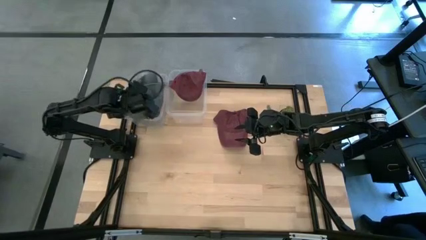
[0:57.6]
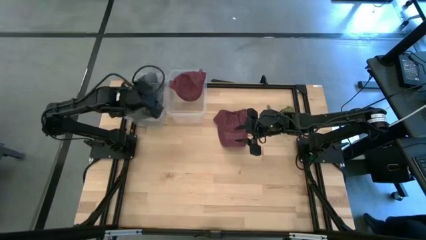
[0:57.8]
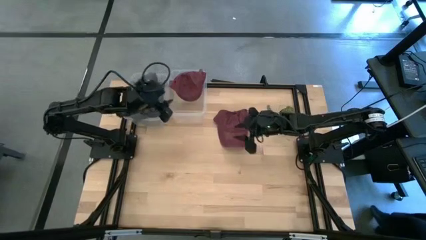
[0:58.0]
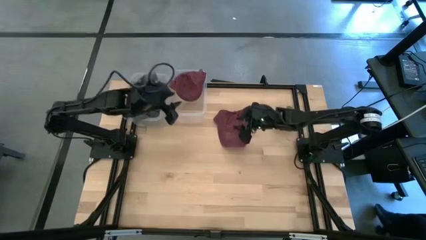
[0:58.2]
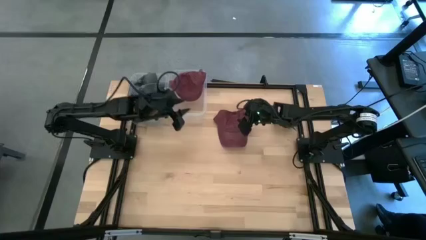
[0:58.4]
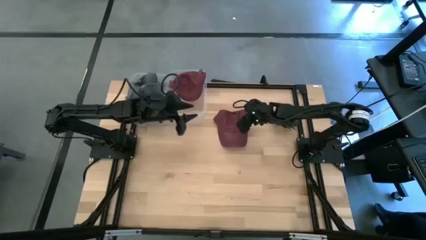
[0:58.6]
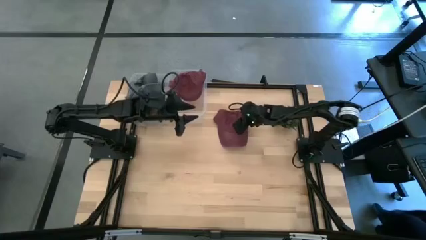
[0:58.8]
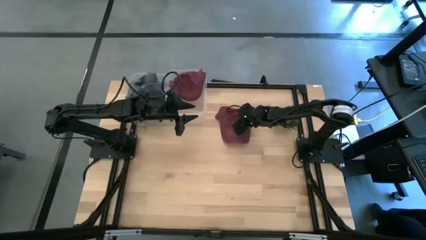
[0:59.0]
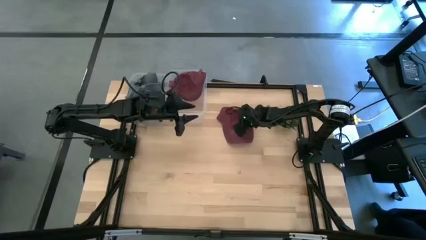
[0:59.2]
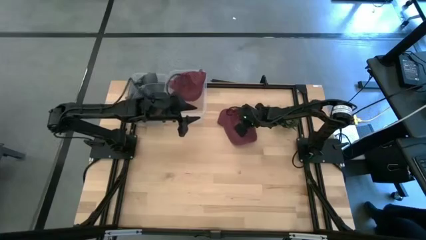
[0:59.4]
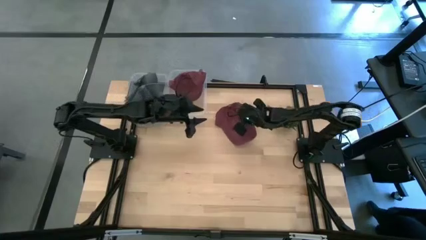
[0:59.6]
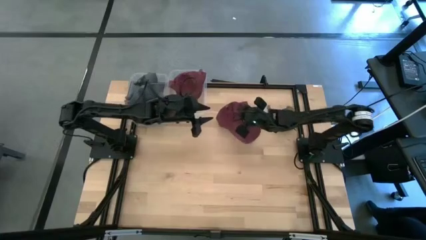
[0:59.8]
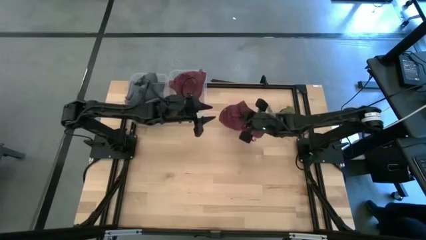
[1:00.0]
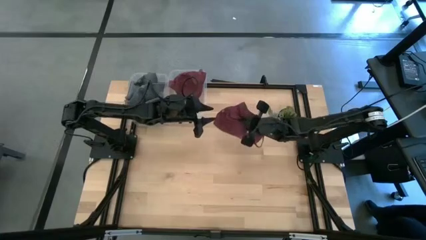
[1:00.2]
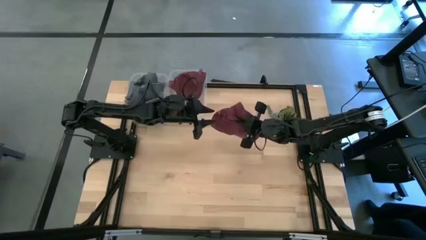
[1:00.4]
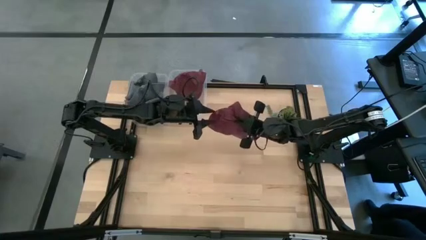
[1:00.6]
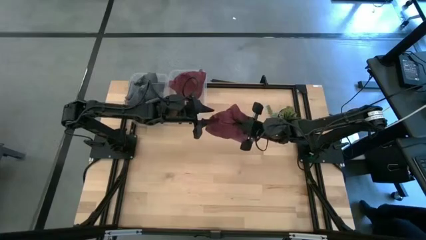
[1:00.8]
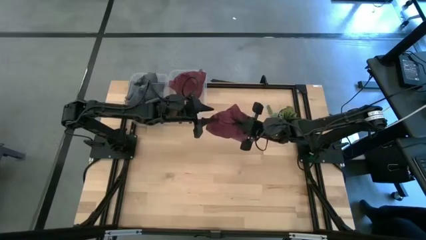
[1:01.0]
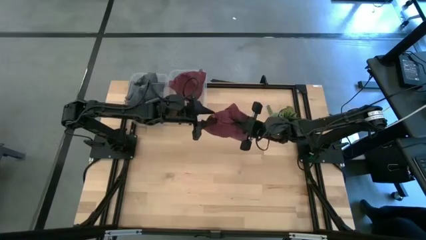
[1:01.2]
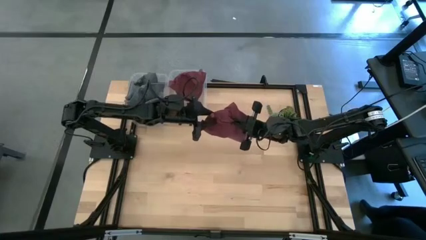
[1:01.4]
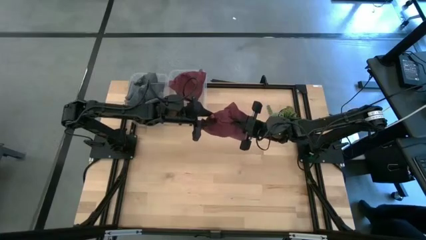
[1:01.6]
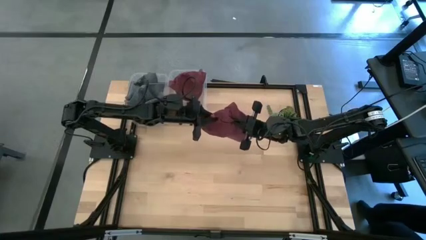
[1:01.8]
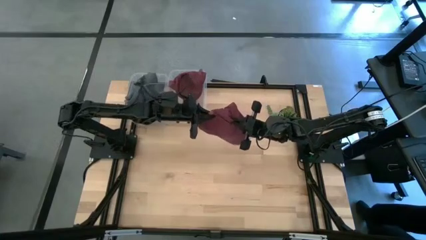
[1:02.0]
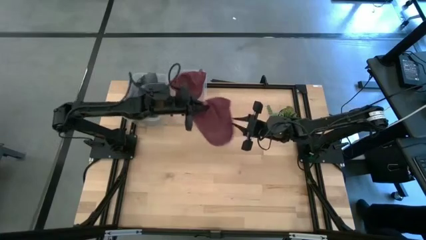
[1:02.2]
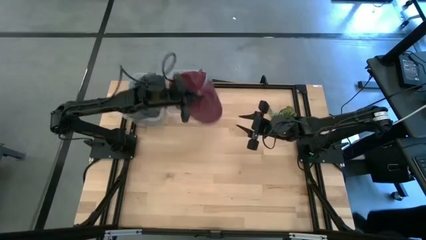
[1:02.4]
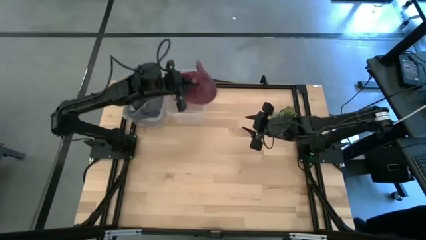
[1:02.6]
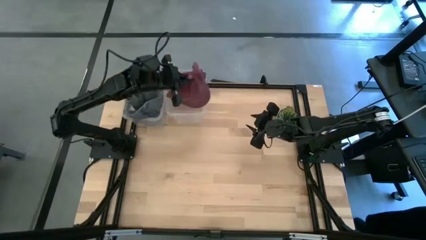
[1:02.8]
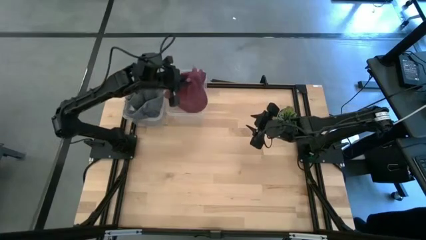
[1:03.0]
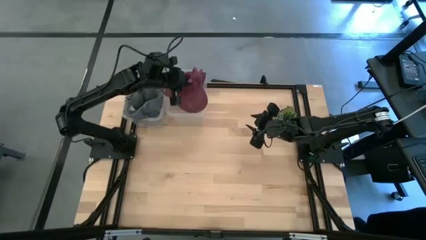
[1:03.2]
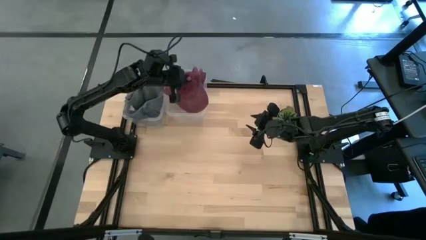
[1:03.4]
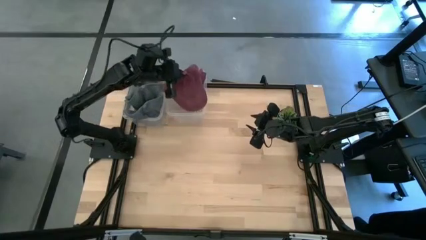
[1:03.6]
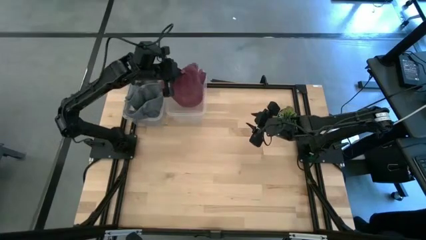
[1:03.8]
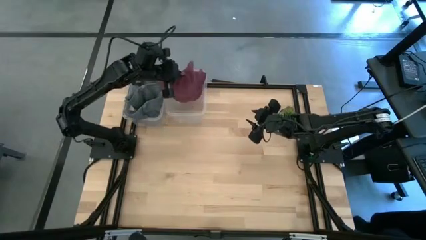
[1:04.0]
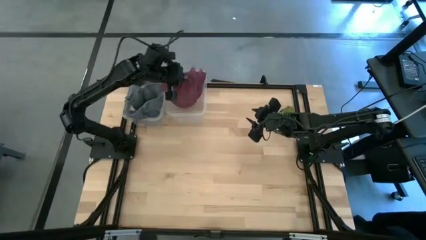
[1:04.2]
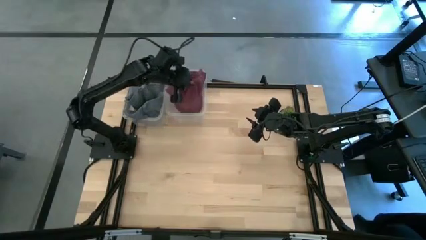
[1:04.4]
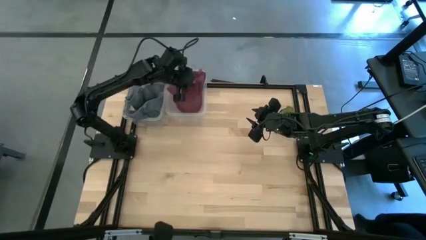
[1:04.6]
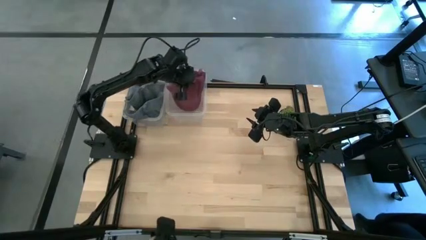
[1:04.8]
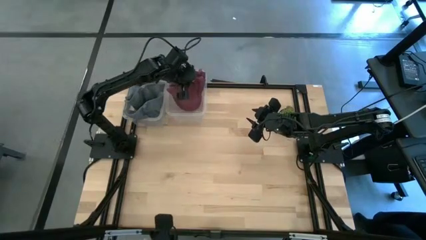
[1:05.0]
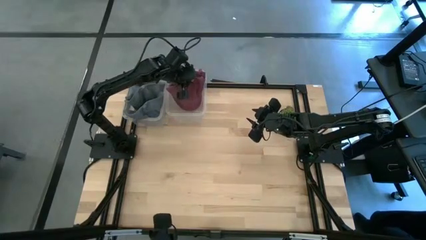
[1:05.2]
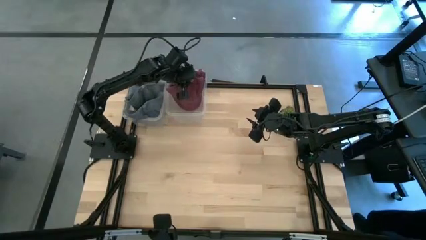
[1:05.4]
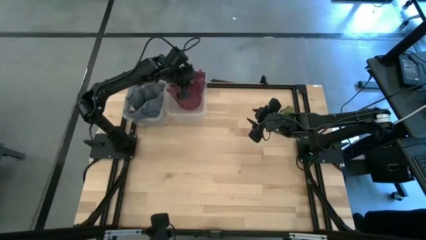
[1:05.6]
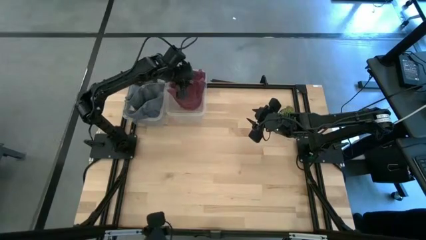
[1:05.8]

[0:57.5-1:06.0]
Task: Pick & Place hat
Put the red cap into the right transparent bin

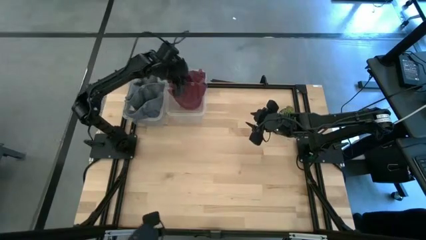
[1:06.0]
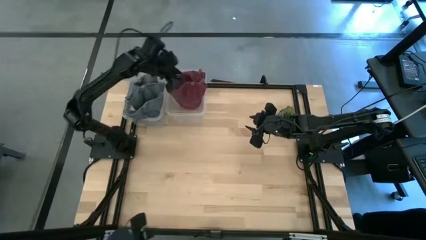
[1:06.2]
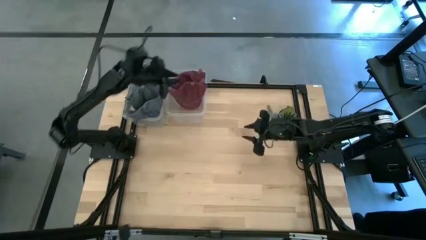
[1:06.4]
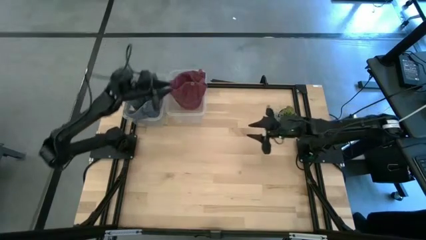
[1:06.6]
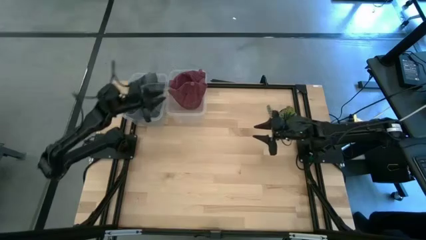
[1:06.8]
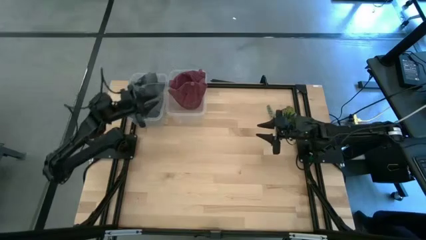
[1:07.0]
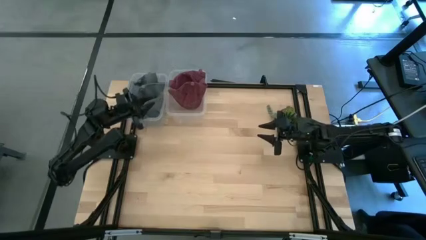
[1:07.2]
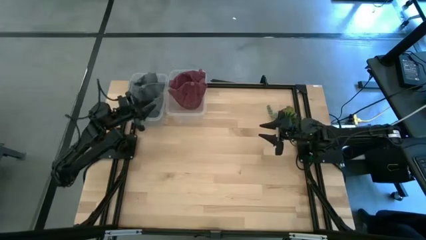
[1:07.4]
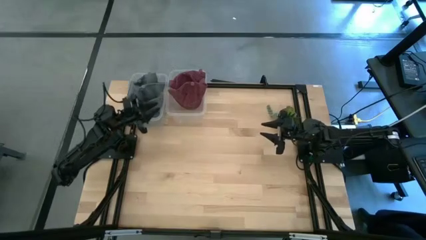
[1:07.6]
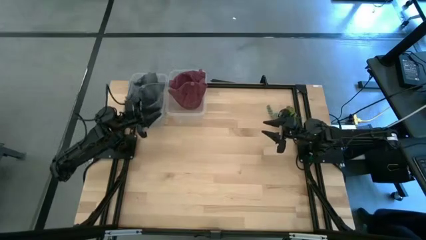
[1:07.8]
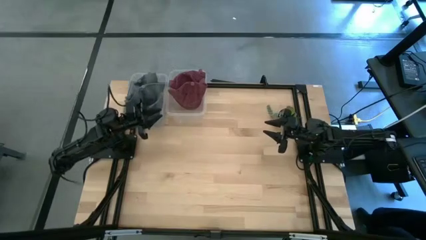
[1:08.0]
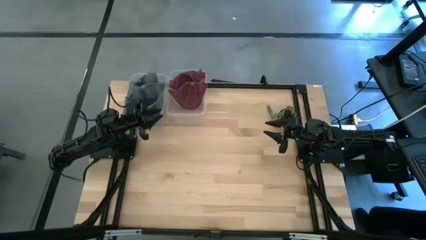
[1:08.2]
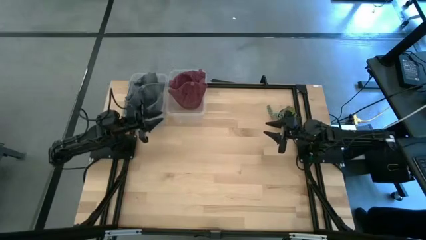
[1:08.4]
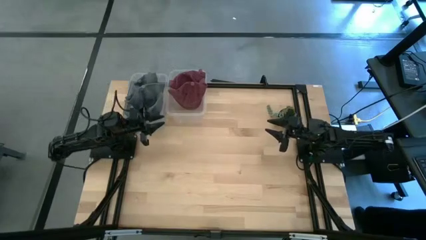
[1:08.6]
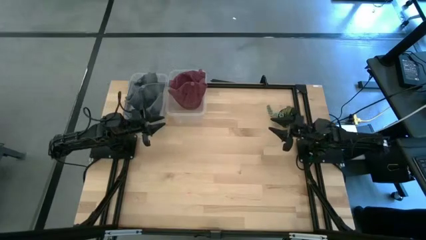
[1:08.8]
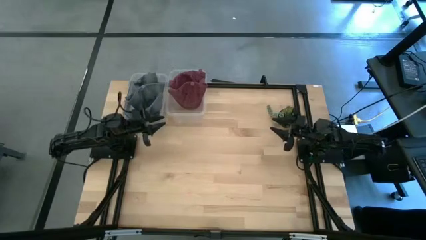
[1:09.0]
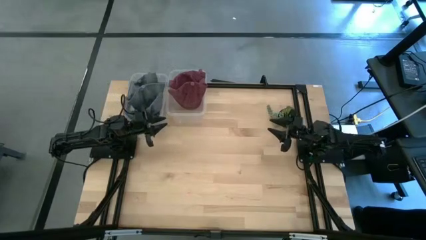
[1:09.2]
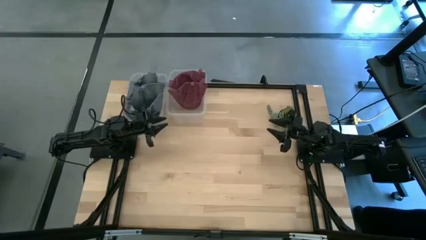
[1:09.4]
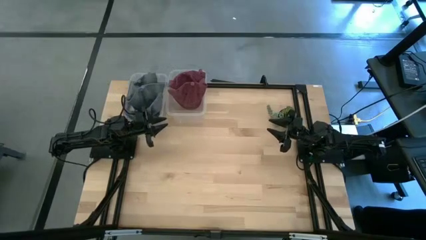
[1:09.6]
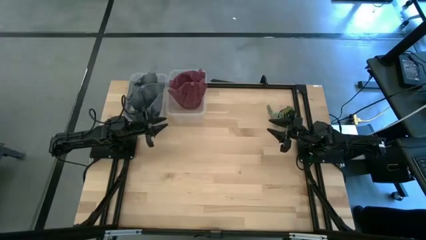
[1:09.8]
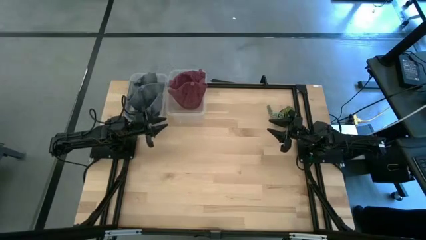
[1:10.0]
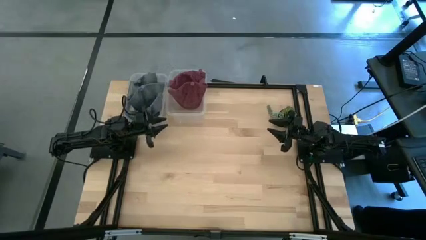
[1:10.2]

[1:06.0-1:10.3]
Return to Home Position

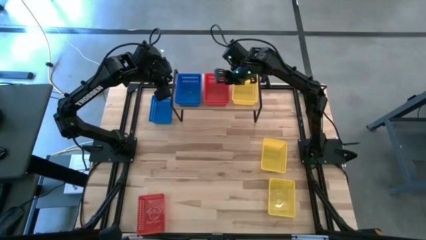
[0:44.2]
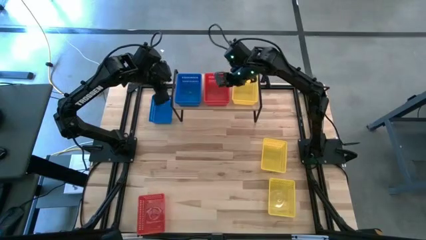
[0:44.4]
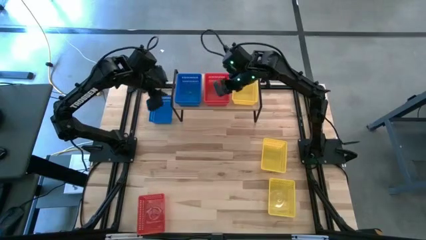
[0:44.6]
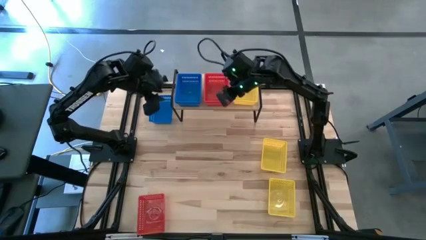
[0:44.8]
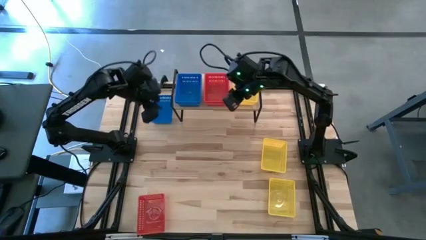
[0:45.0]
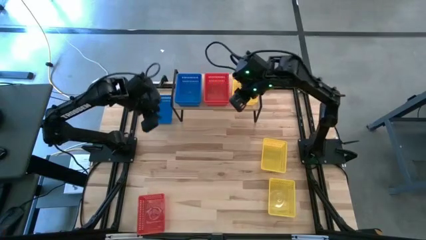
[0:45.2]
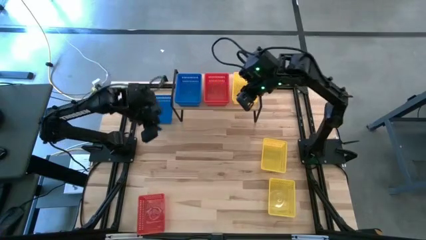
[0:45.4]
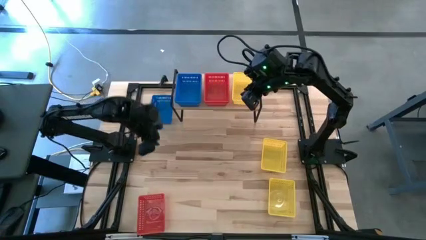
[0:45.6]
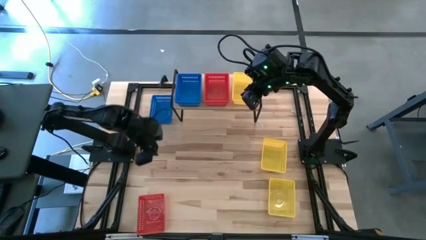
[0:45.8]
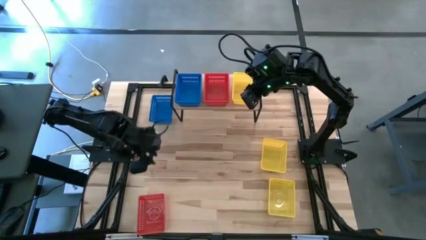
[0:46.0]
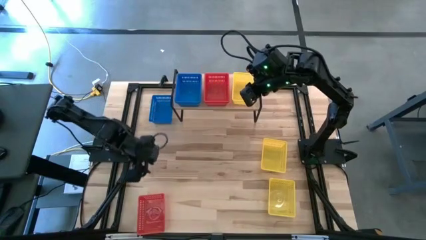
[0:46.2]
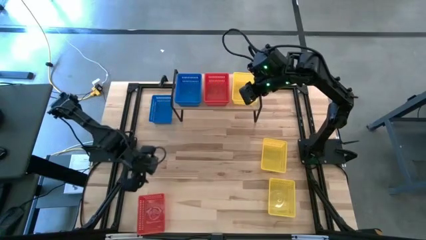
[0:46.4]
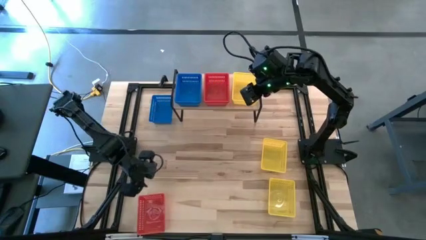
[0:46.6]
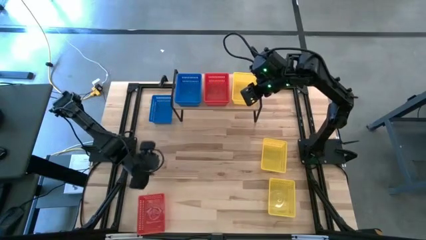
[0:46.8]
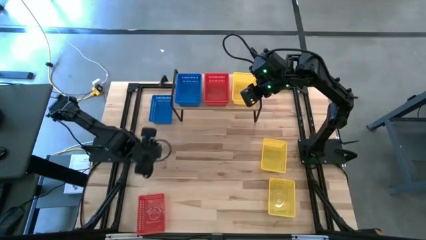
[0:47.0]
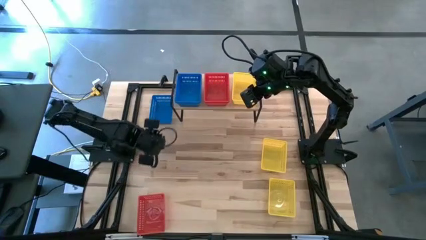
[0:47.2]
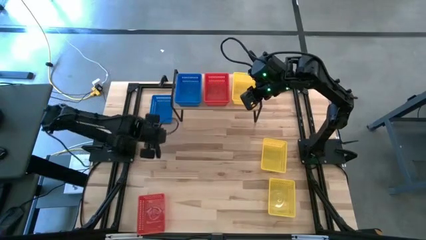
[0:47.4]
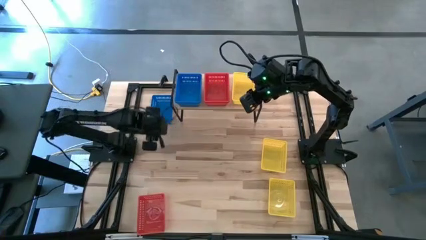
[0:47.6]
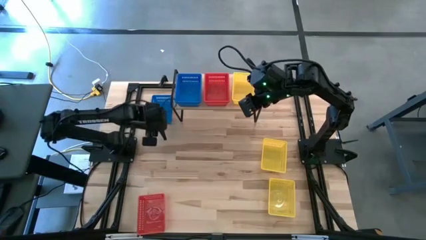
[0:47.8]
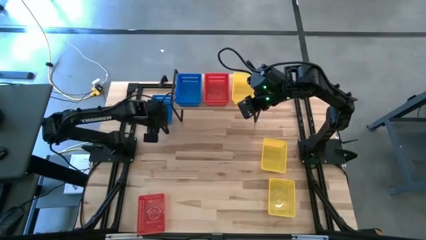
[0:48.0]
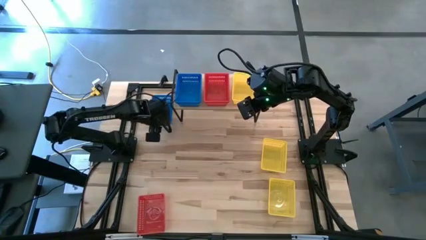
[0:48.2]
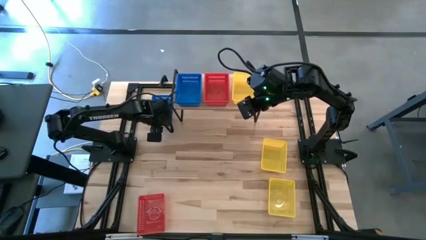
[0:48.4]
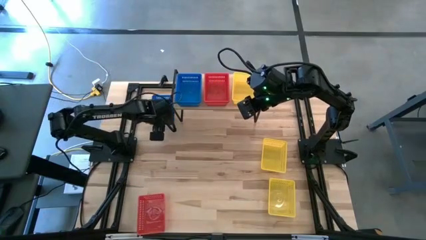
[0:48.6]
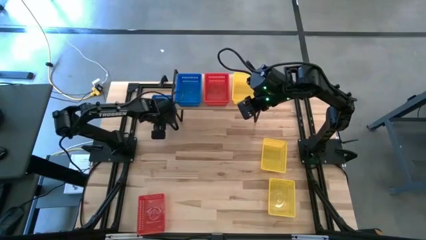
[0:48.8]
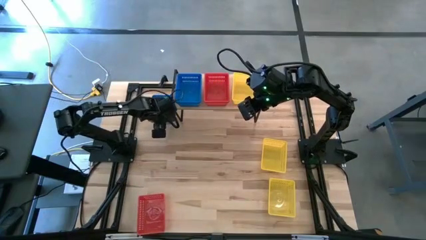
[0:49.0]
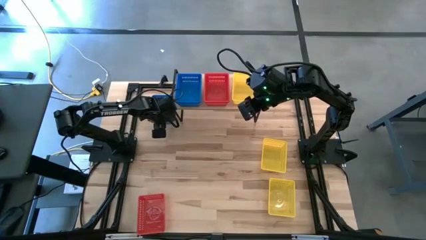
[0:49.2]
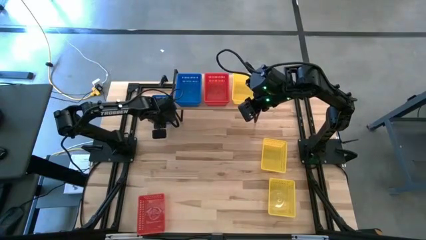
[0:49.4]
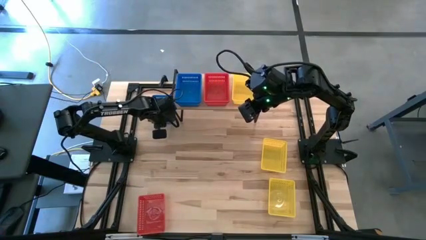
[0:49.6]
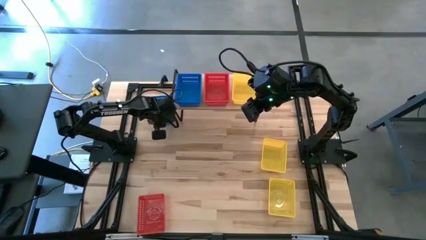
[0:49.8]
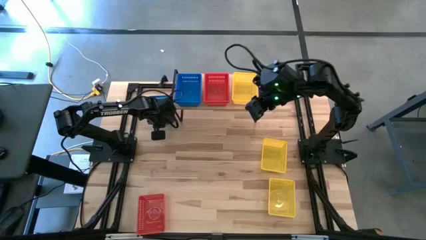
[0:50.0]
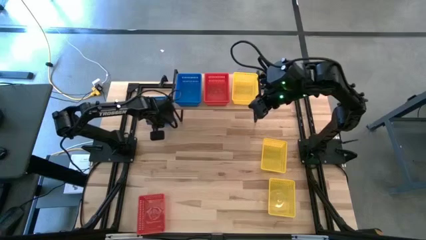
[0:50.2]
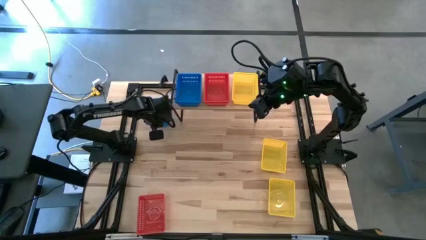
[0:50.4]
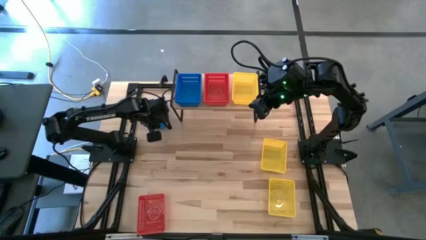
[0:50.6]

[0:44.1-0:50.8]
Task: Stack baskets on shelf by color
Stack the blue bin on top of the blue bin on the shelf
